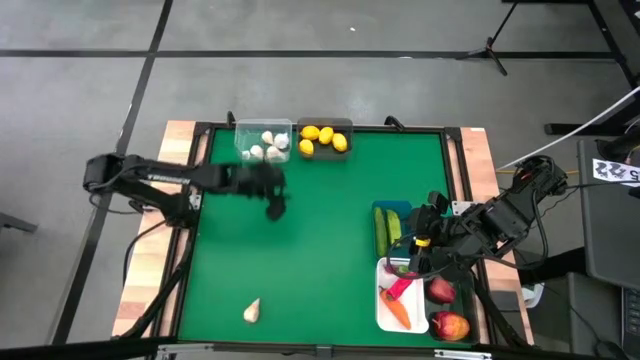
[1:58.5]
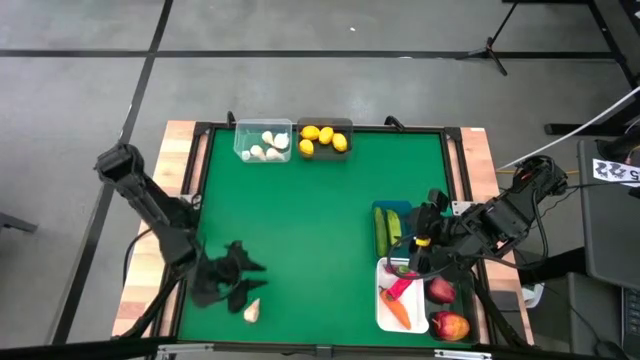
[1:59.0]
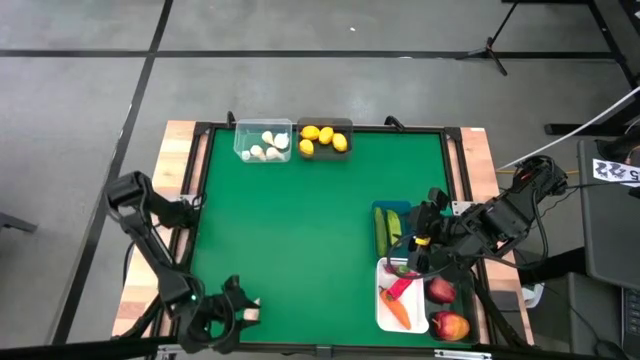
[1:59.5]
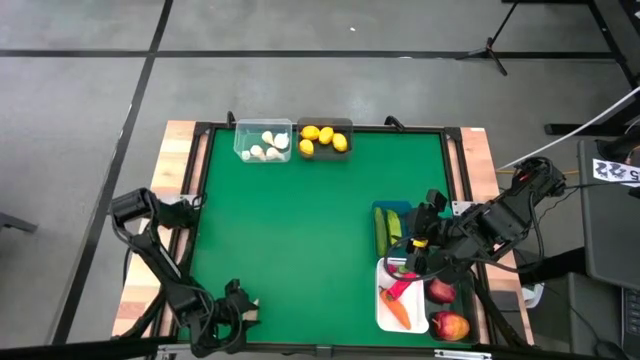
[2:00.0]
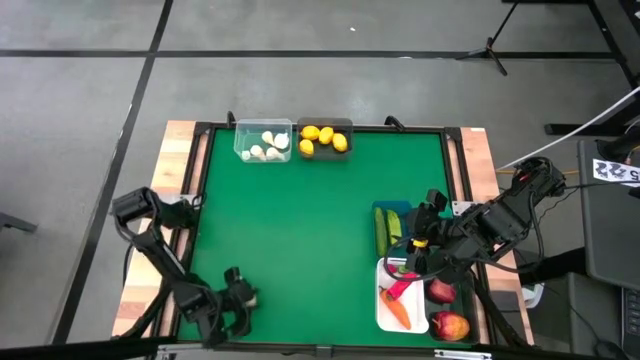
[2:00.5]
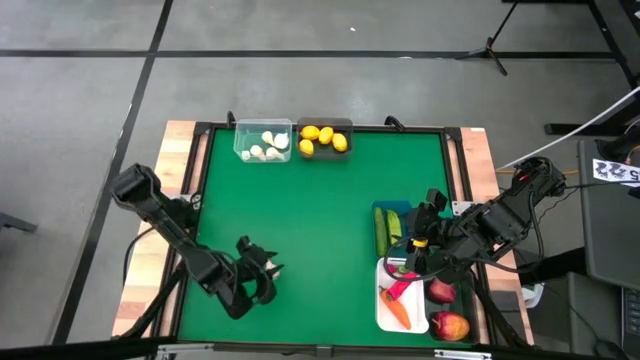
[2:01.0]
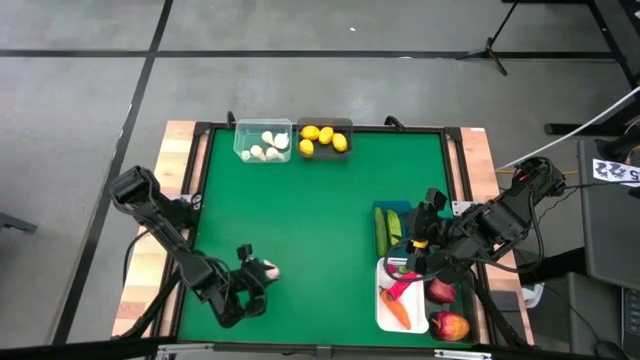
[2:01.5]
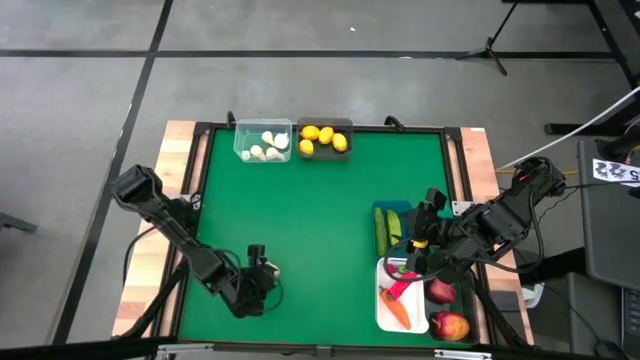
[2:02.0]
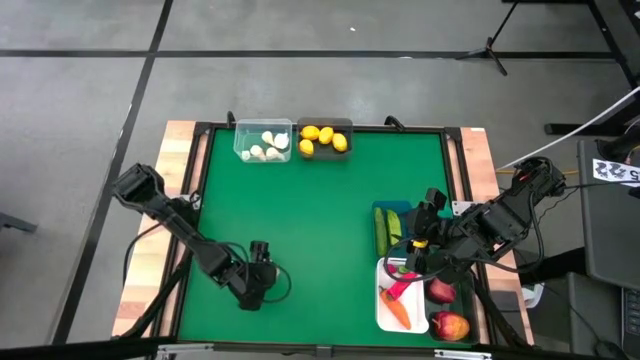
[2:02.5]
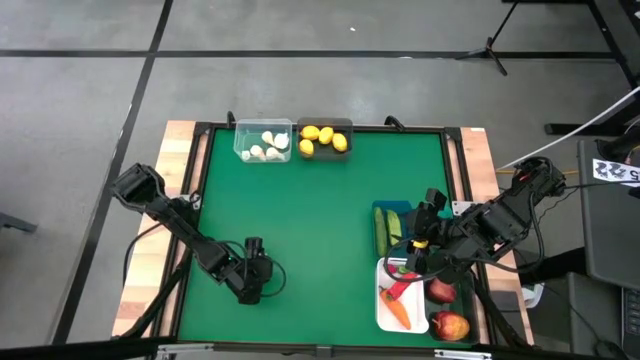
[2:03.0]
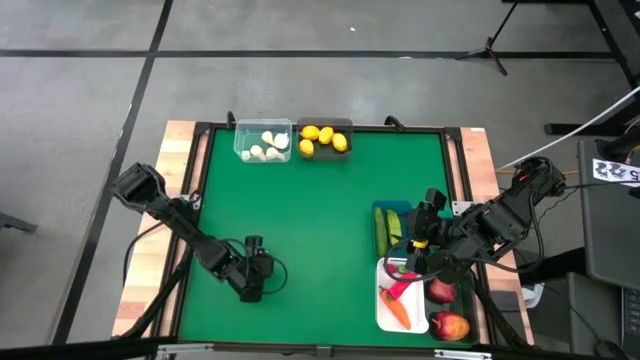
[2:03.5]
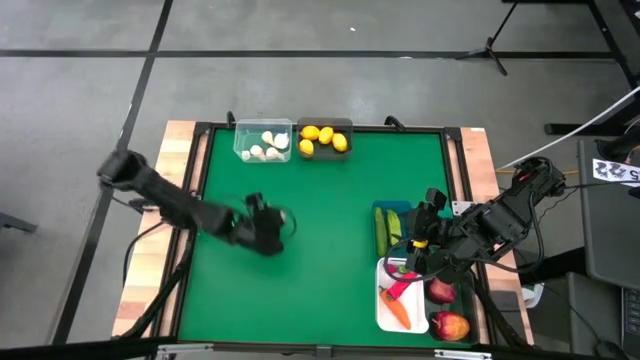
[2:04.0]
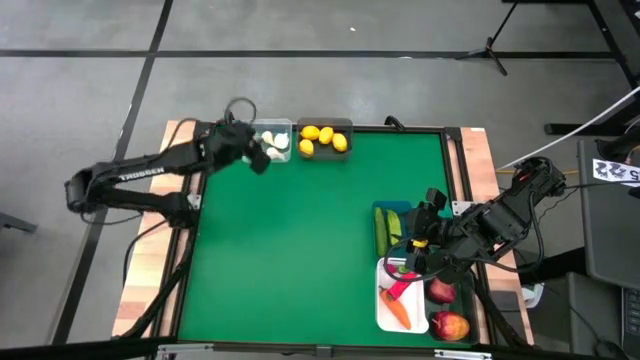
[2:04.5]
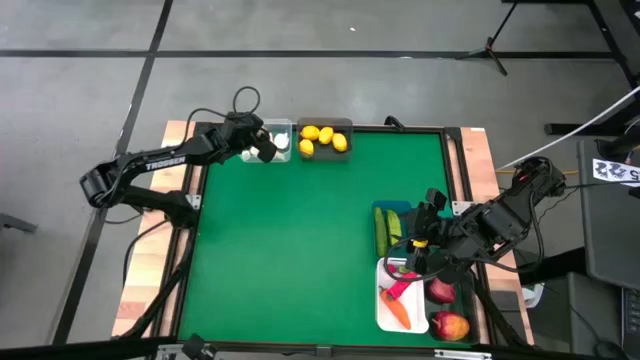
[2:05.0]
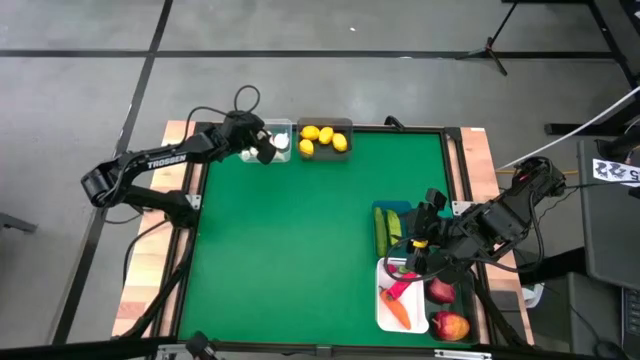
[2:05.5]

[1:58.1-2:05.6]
Task: Sort produce into baskets
Put the white garlic into the transparent bin

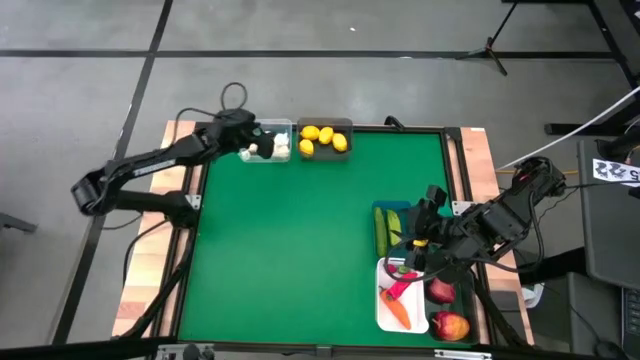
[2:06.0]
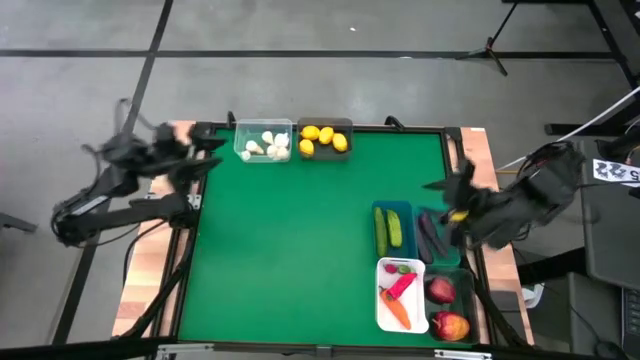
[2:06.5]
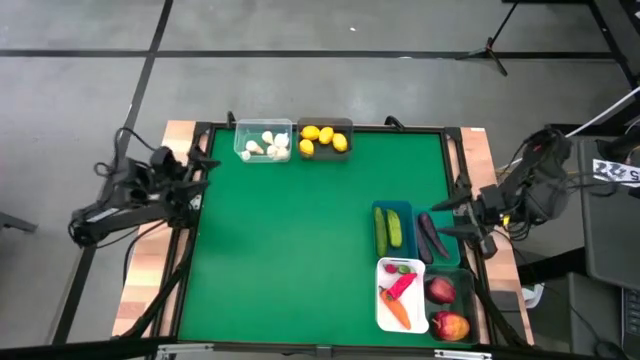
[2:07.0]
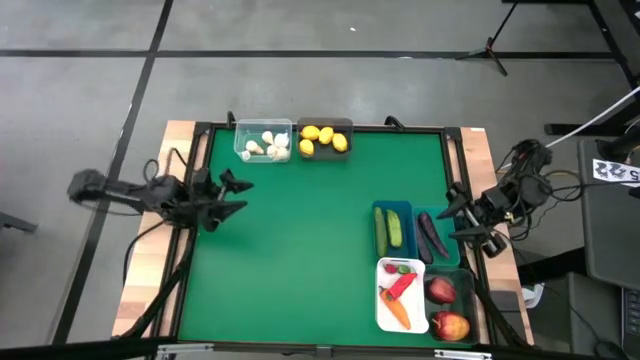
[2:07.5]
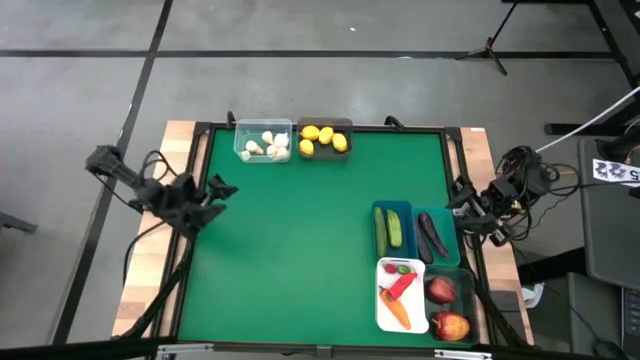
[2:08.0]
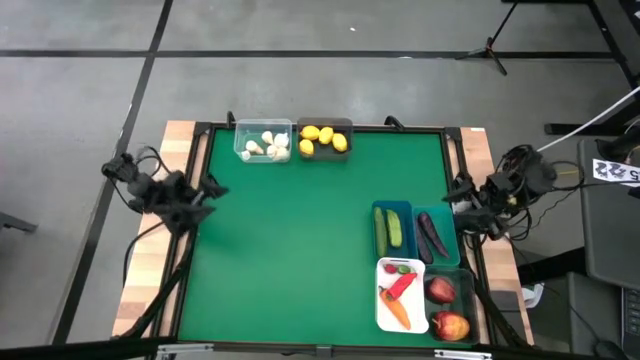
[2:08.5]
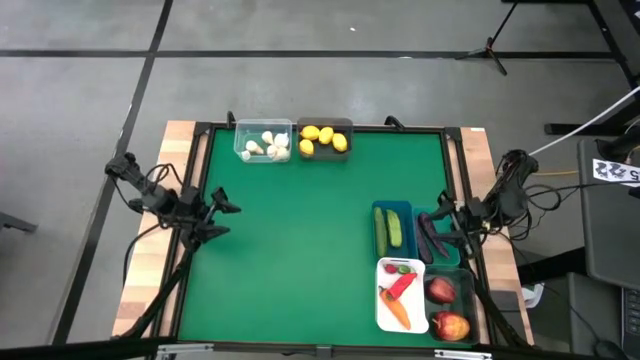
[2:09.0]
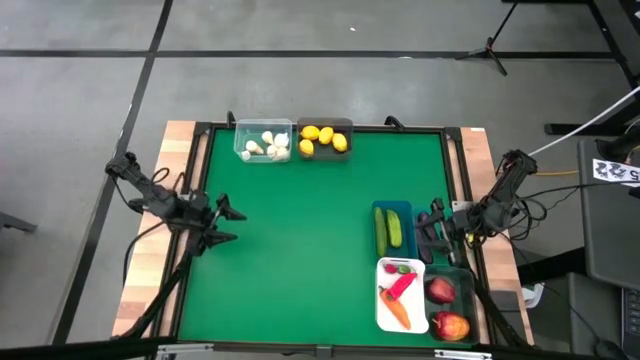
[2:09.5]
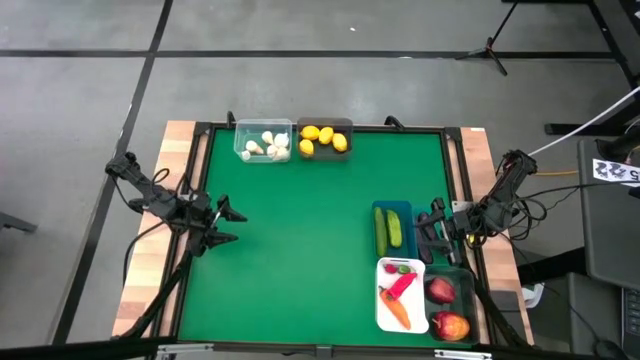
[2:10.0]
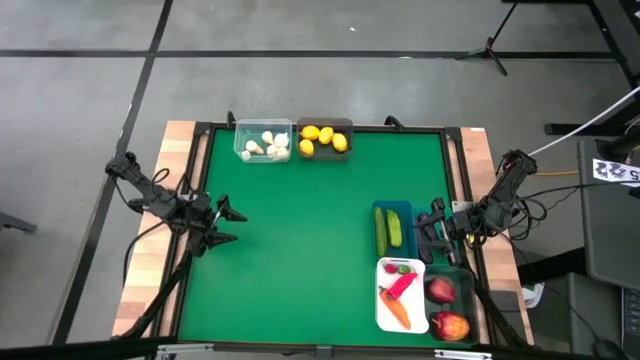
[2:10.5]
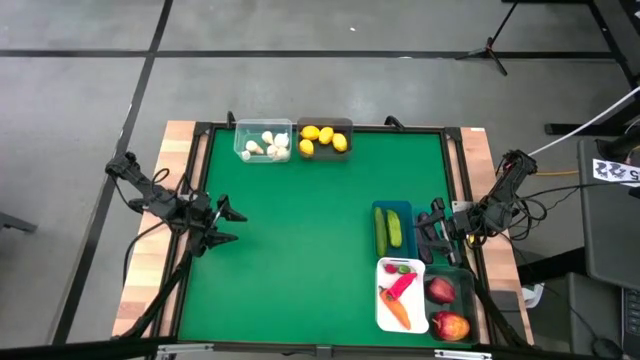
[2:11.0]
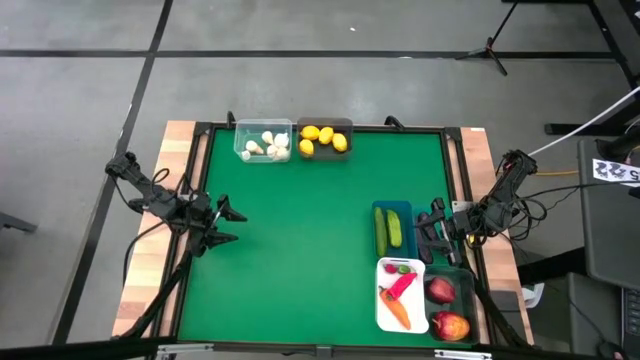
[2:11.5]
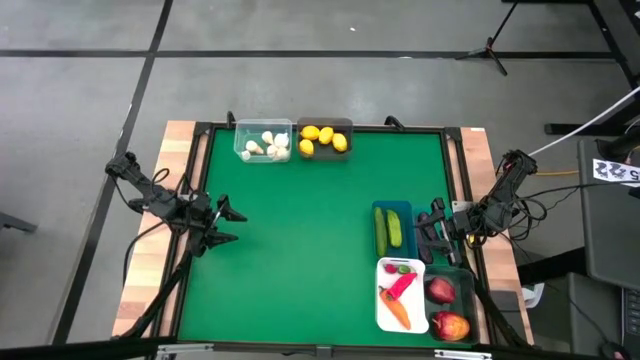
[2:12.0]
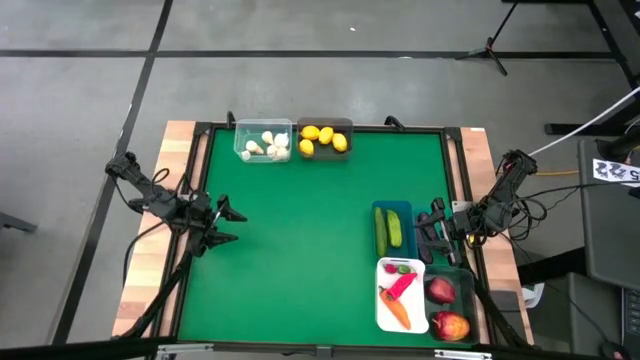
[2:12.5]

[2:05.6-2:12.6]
Return to Home Position

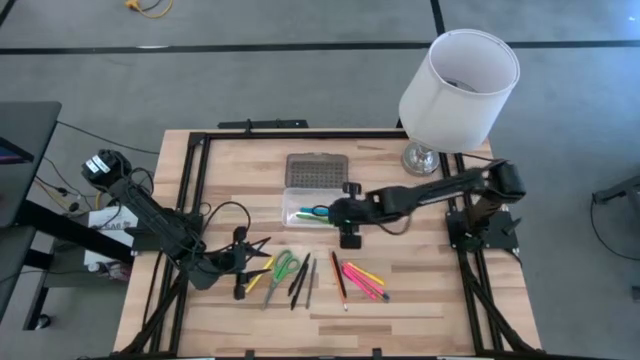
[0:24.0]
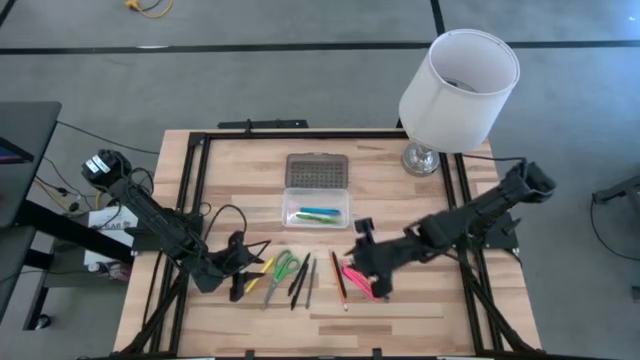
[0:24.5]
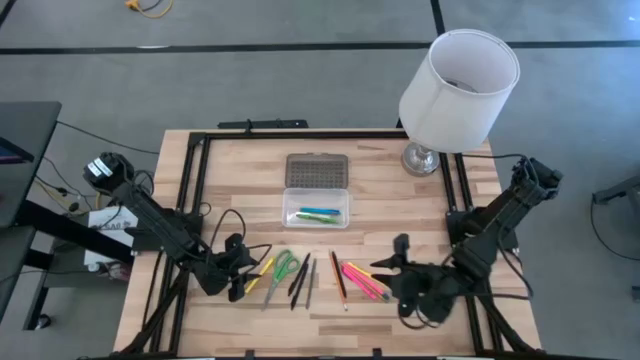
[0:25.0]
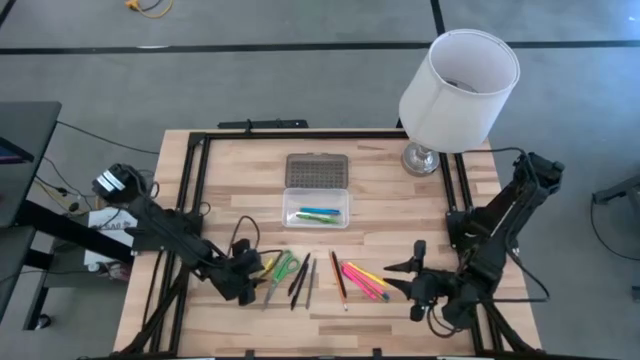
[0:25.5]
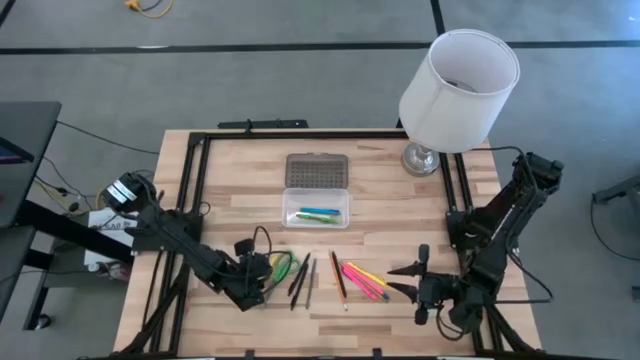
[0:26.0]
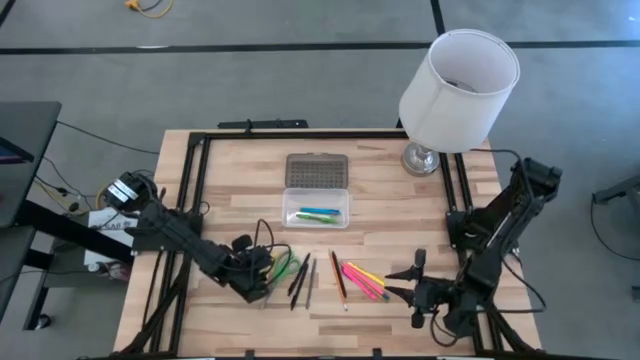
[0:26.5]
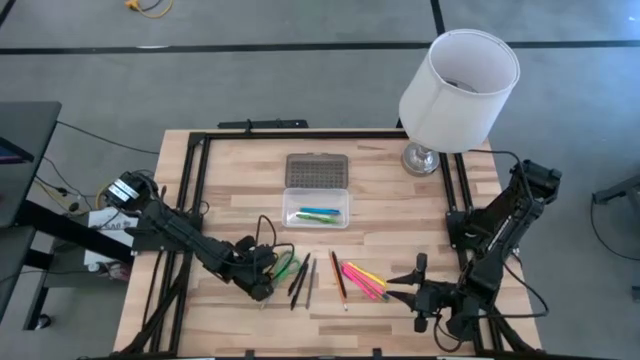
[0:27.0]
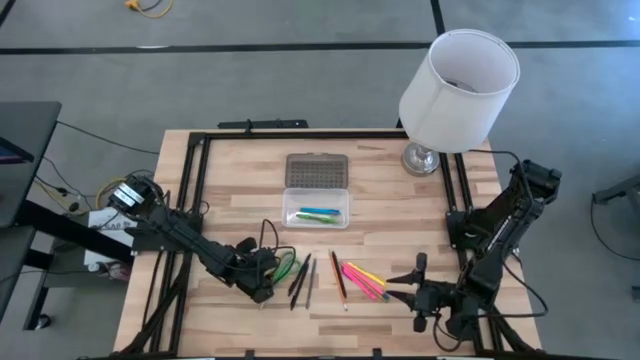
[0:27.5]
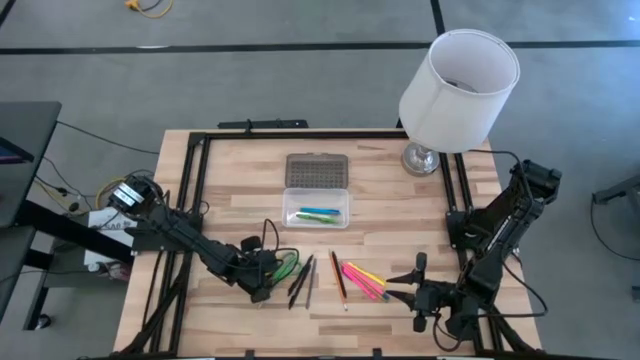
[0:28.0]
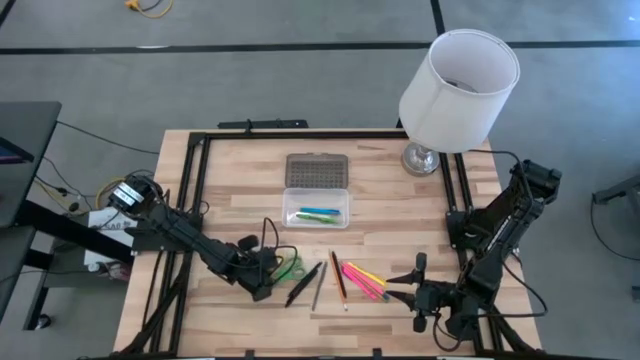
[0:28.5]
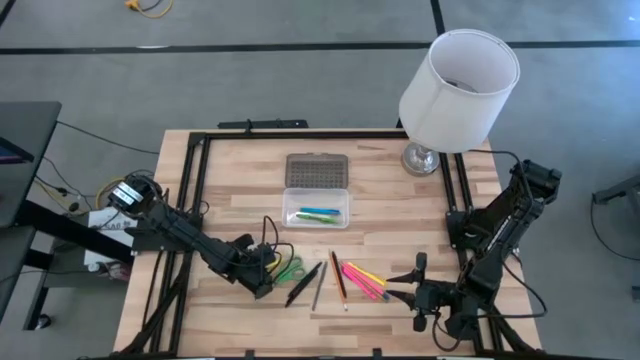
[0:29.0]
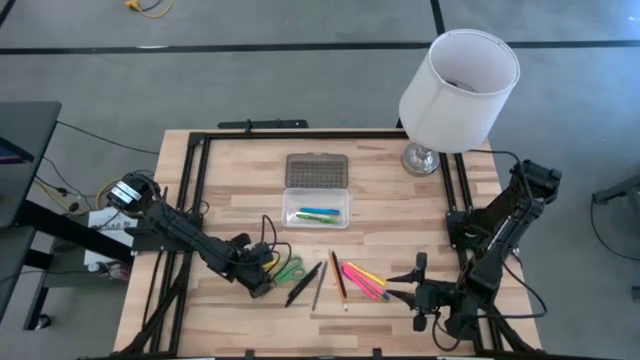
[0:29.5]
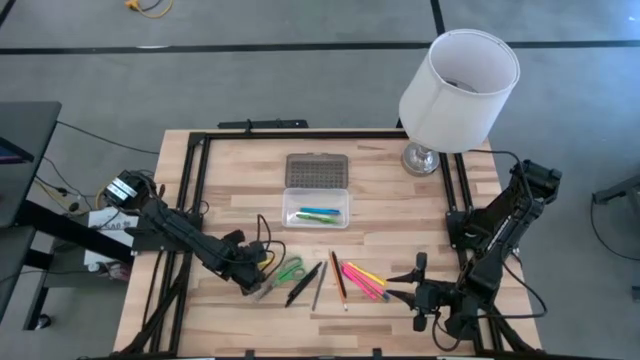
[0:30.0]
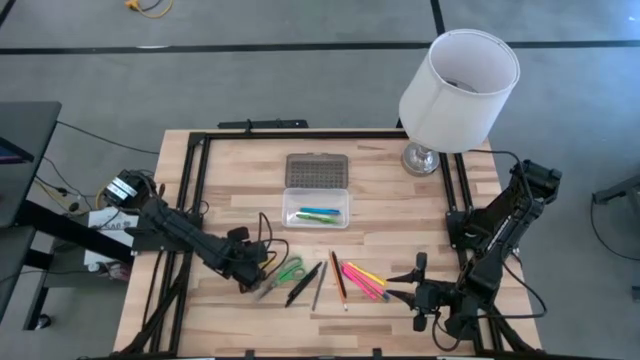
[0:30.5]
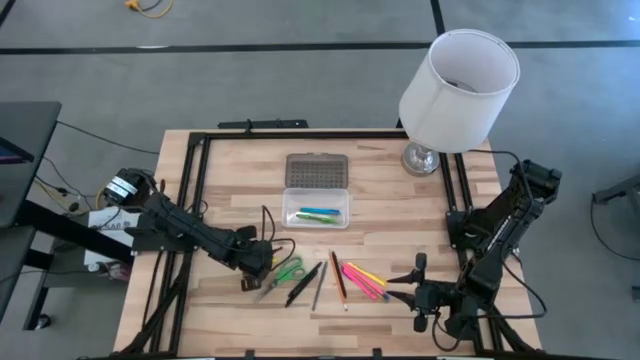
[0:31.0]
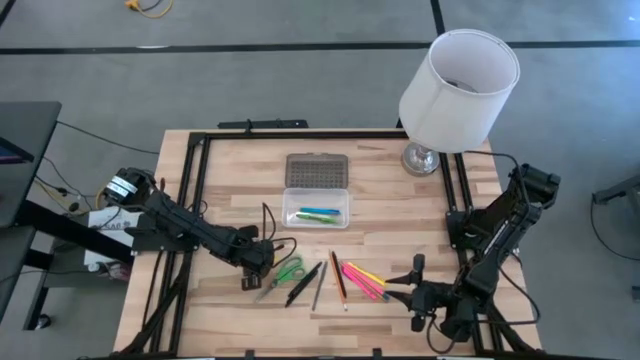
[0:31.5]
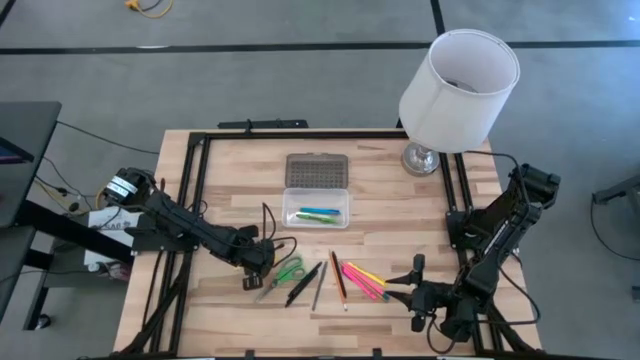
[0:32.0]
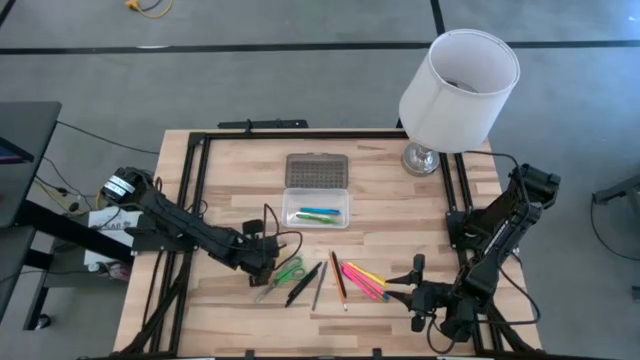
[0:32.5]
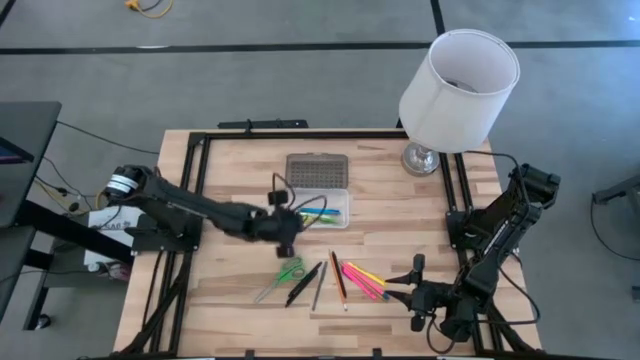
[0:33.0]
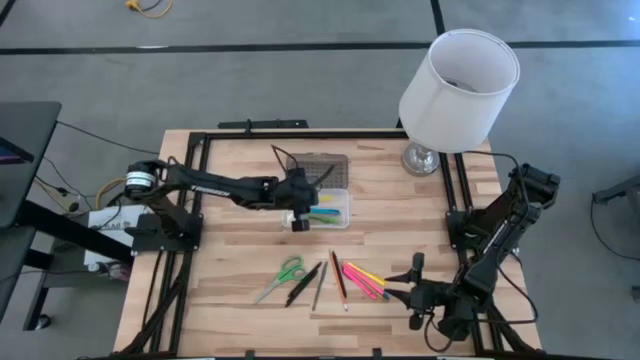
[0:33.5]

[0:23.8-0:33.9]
Task: Pick & place school supplies into a supply box
Put the left yellow pen into the black supply box
